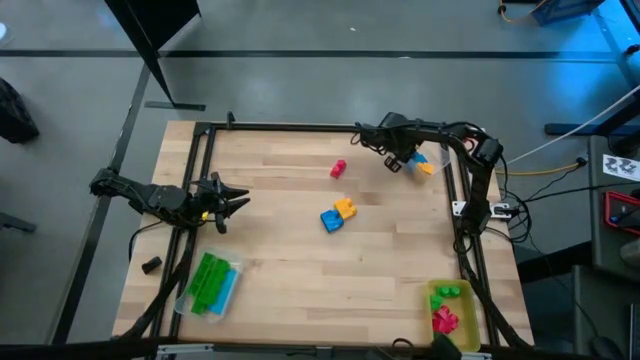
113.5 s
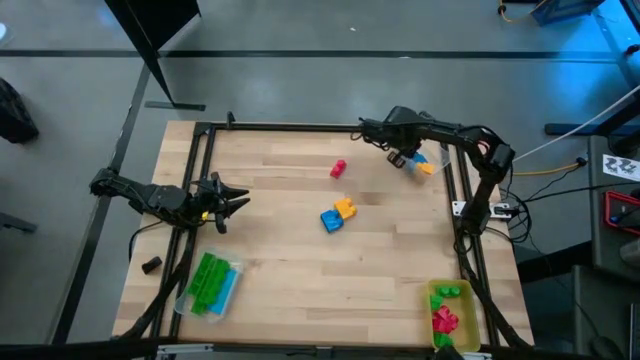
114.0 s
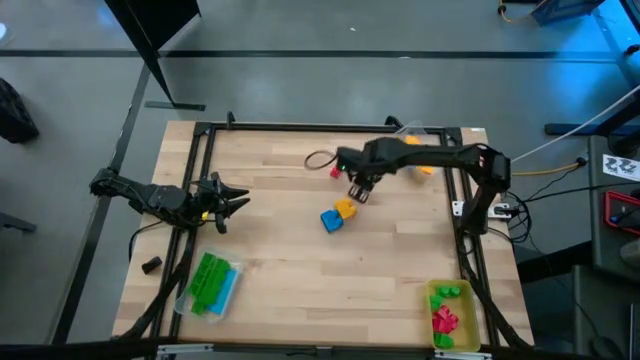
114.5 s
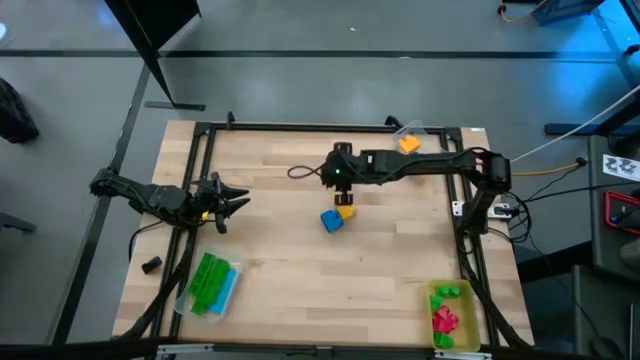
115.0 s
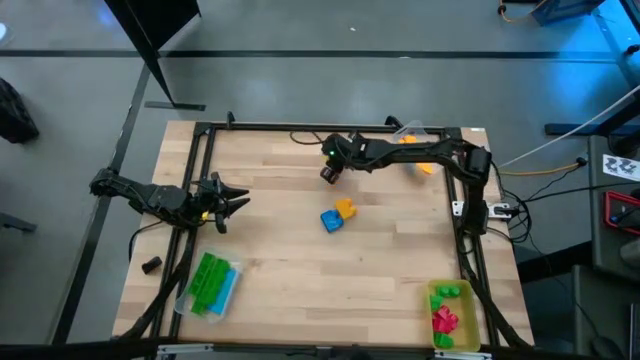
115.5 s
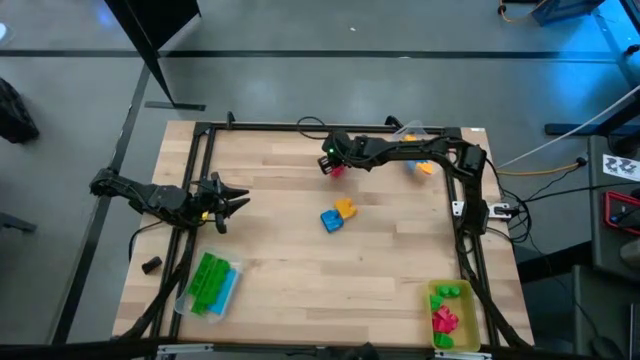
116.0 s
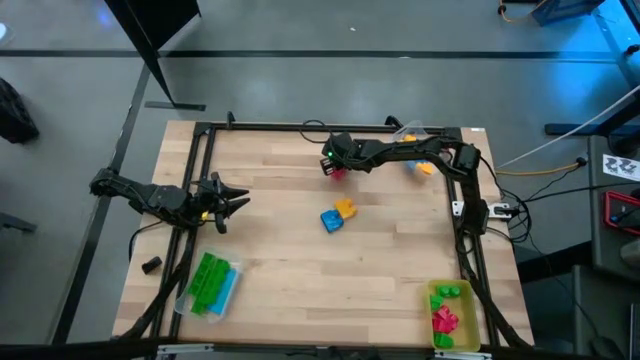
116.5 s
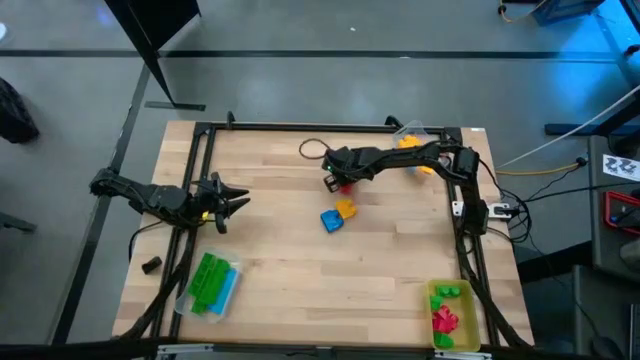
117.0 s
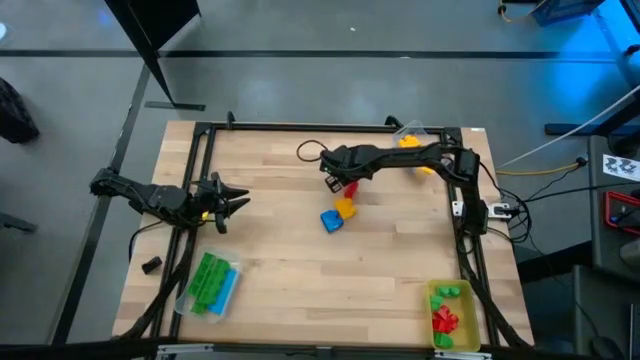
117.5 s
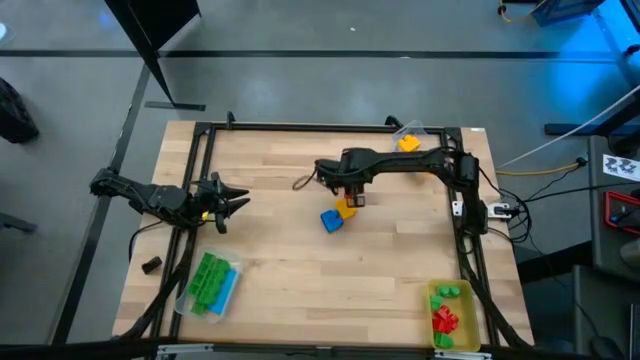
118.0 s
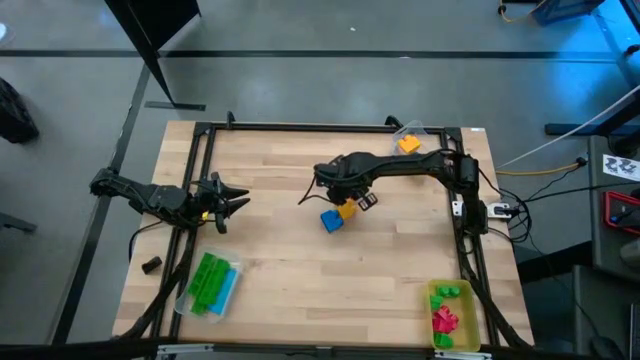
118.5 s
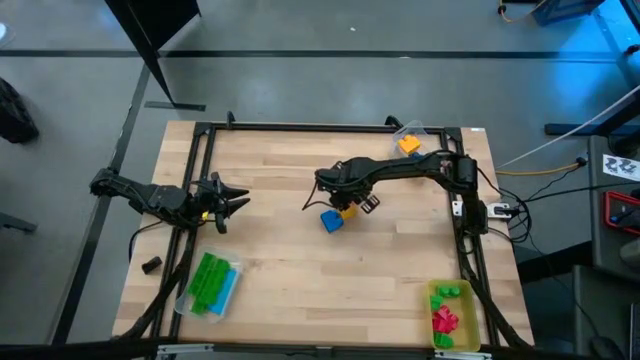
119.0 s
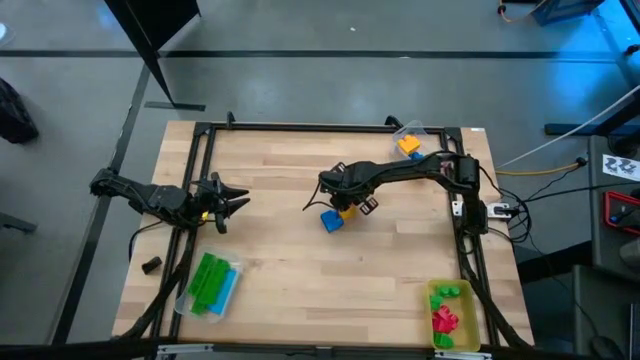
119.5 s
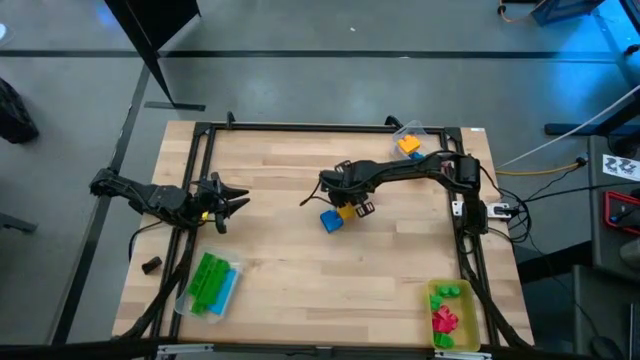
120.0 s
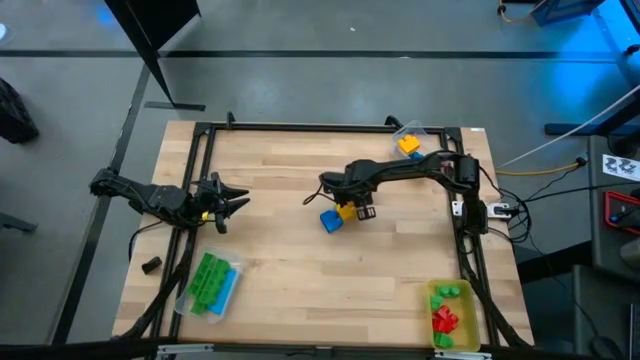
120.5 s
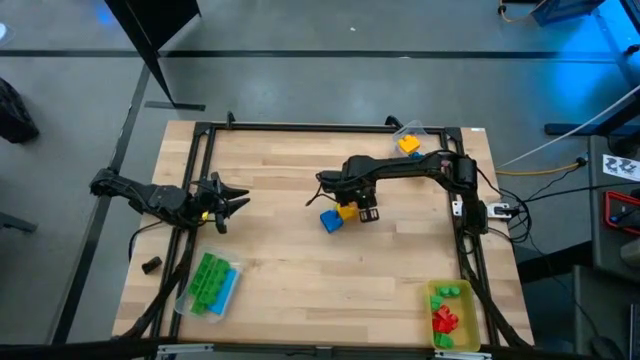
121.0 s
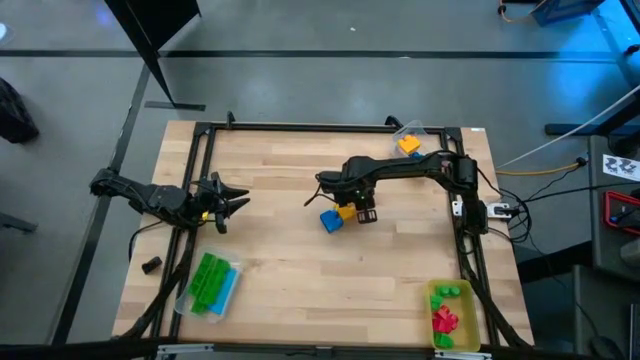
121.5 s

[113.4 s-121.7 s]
Task: Sort blocks by size
Put the 2 stud red game piece into the yellow transparent bin

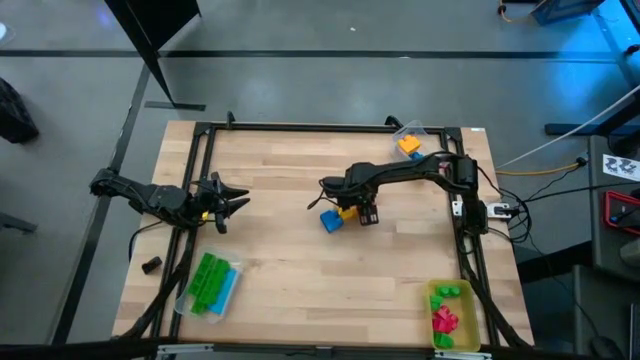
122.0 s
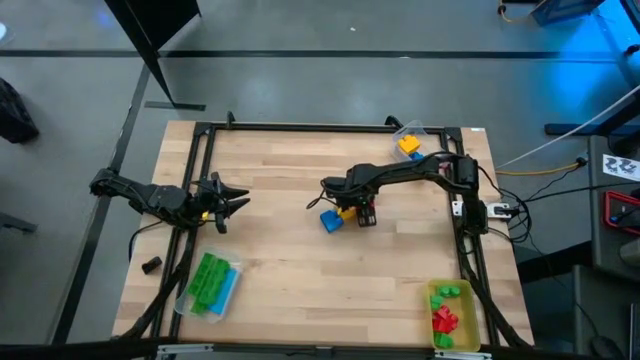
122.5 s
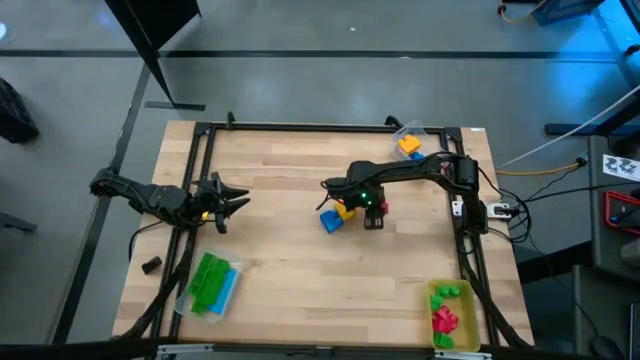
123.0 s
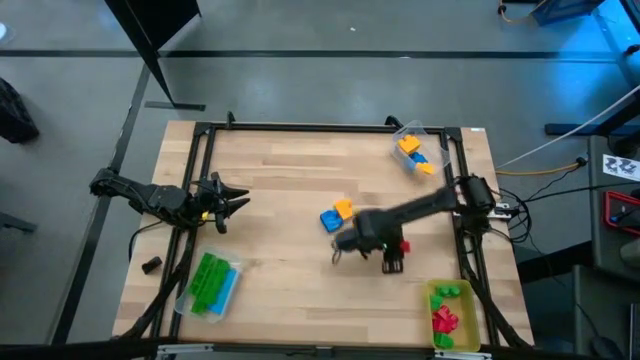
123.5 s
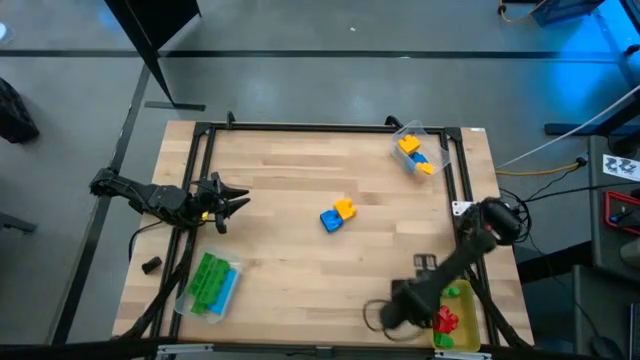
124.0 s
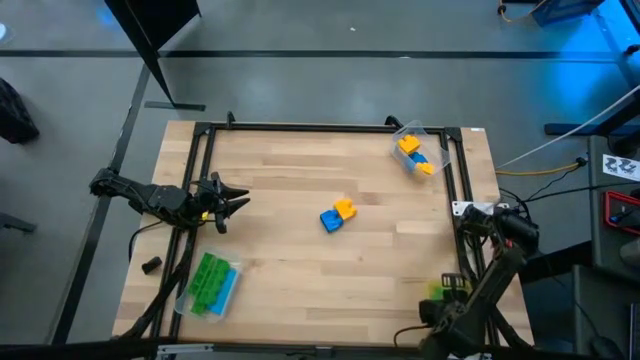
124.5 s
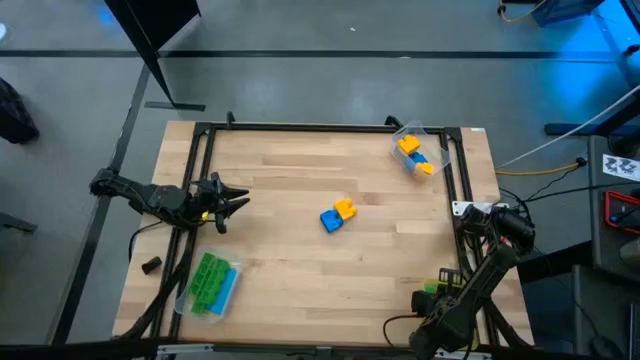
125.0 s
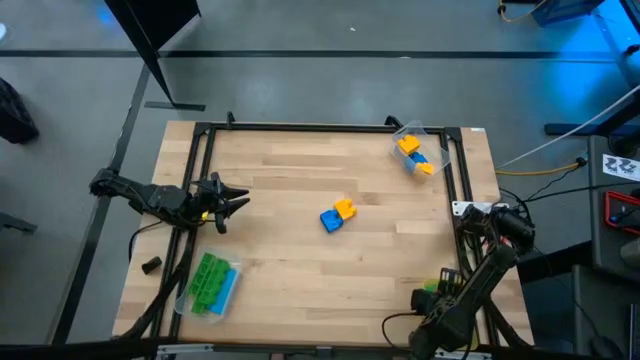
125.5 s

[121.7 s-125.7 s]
Put the 2 stud red game piece into the yellow transparent bin

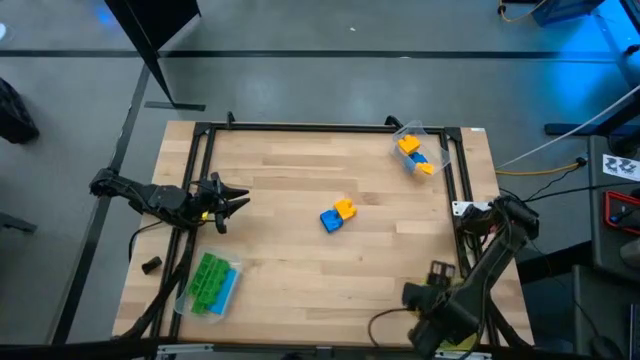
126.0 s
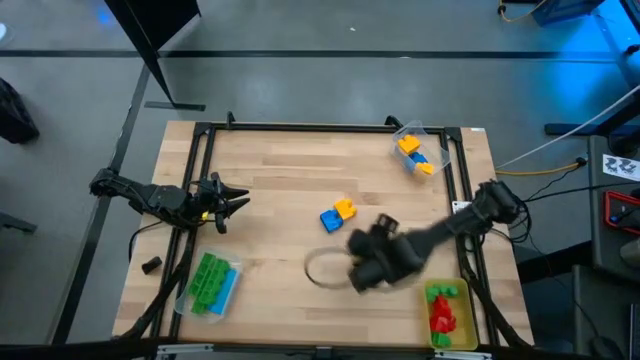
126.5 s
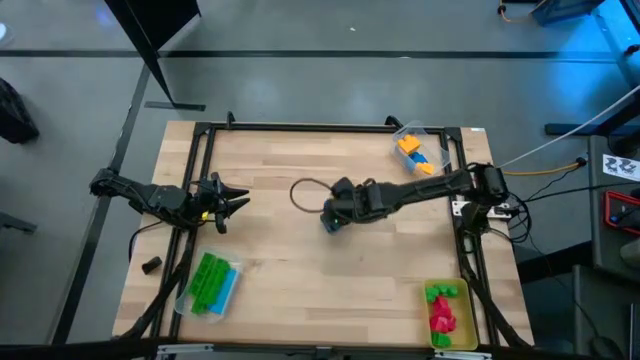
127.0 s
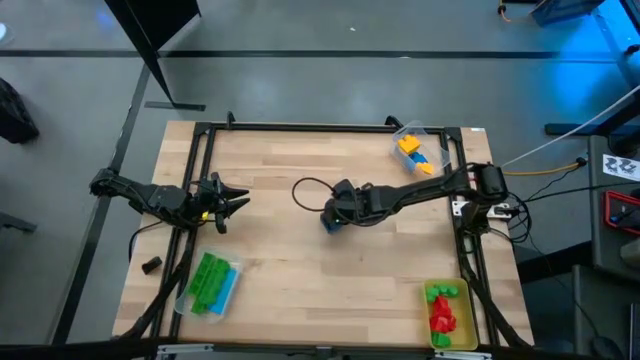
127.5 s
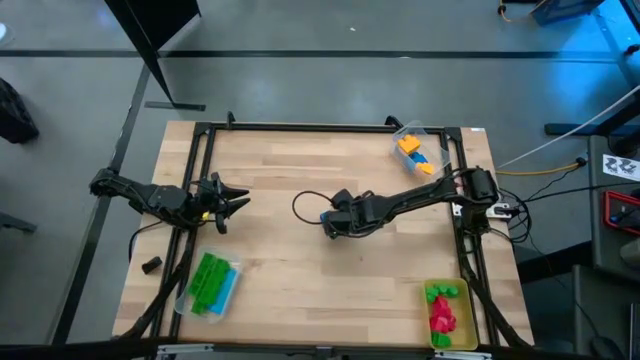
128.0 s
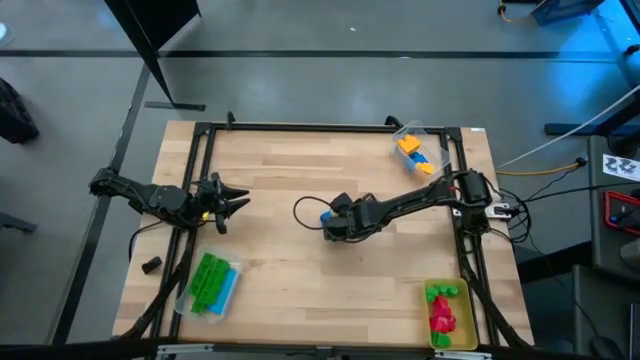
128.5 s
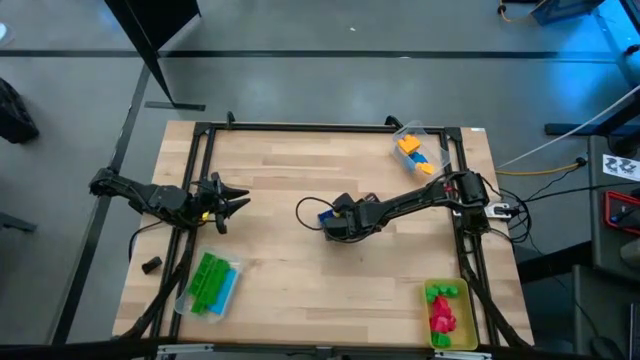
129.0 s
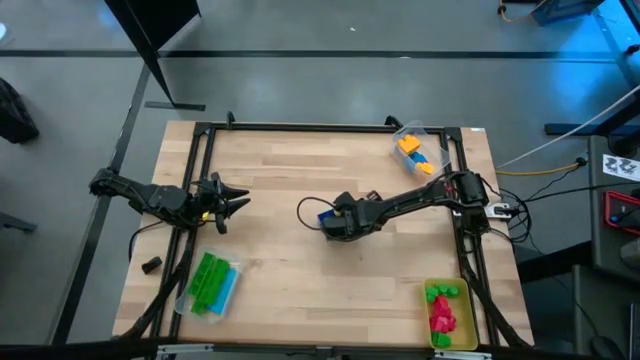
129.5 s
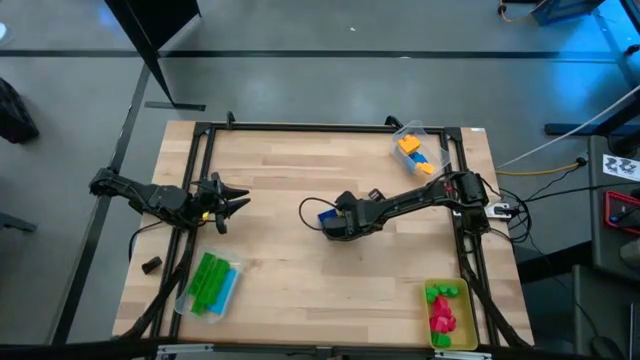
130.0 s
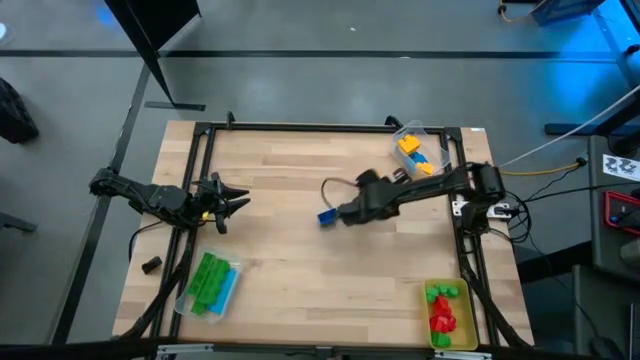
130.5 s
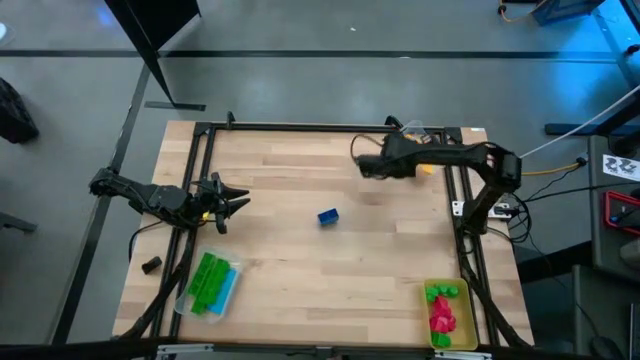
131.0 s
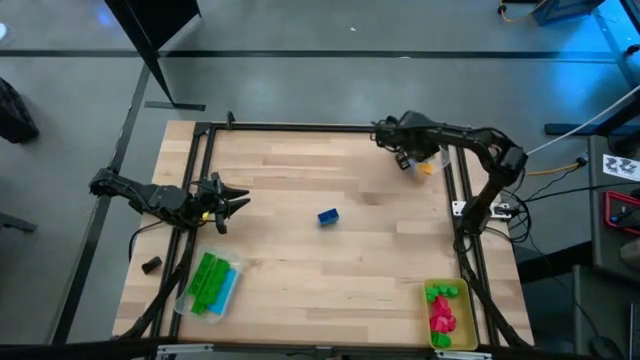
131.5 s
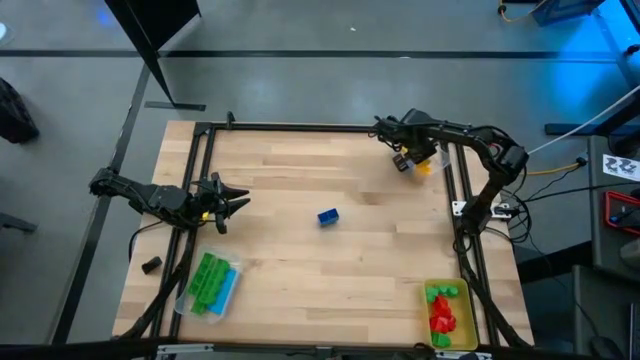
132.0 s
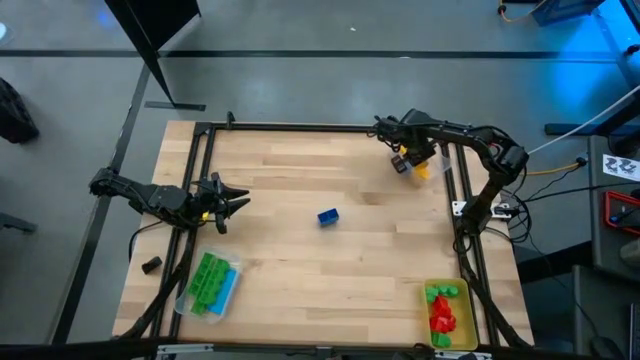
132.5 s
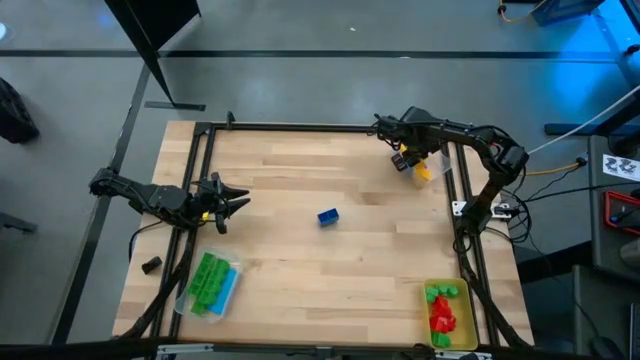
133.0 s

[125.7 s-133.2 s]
Put the 2 stud yellow game piece into the top transparent bin

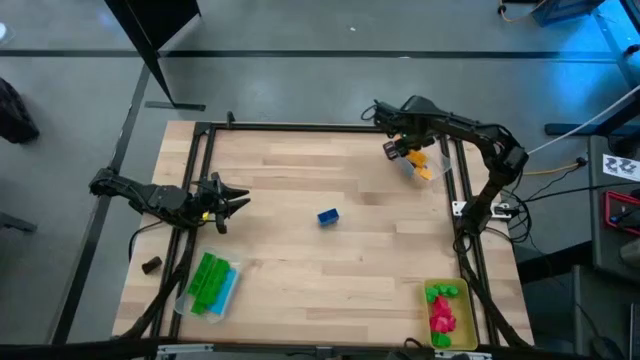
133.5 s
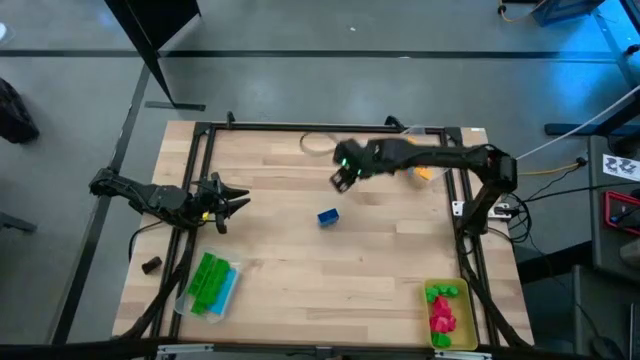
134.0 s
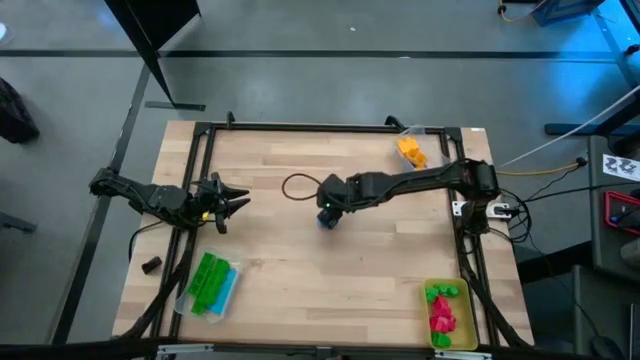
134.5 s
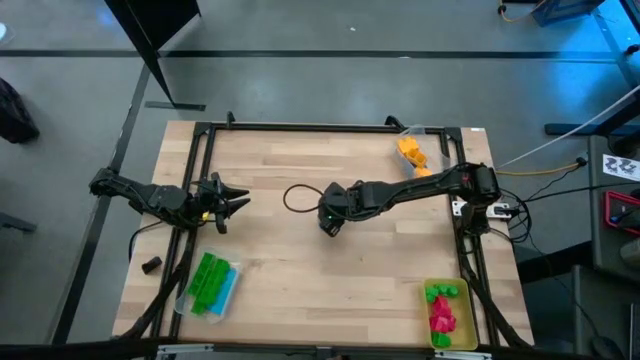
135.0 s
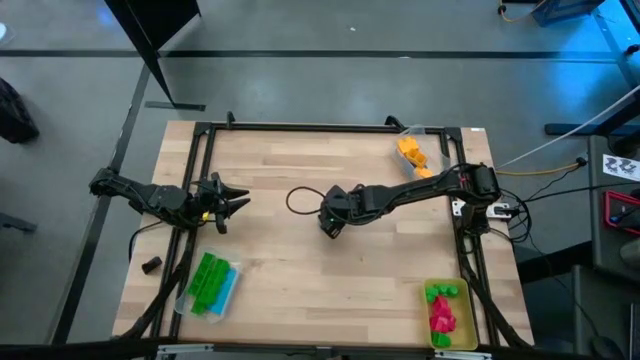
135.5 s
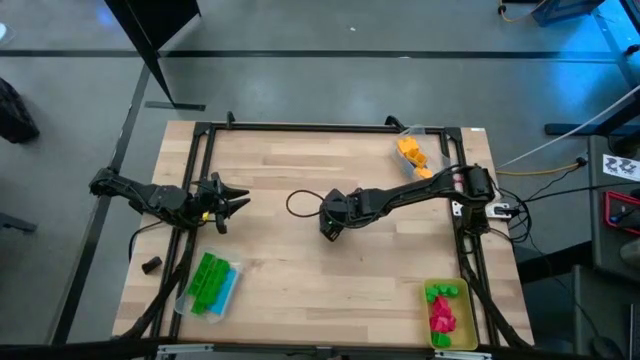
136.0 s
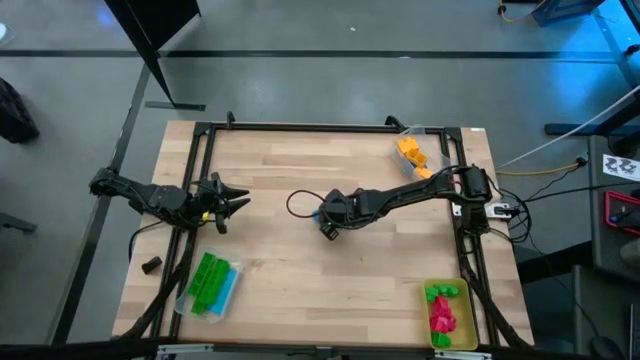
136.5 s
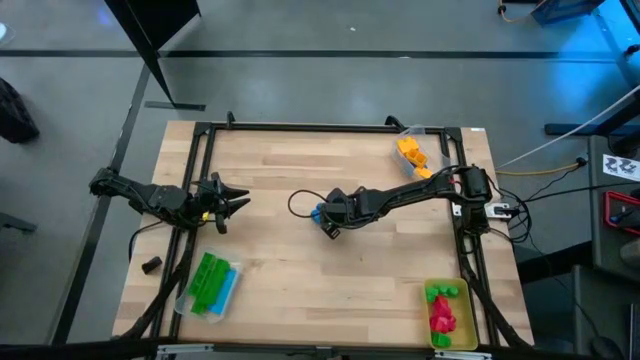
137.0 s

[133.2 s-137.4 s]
Put the 2 stud blue game piece into the top transparent bin
